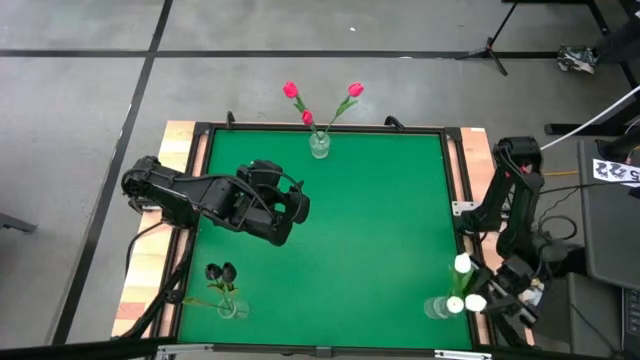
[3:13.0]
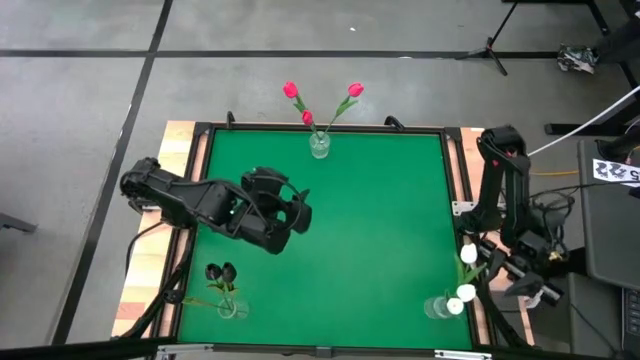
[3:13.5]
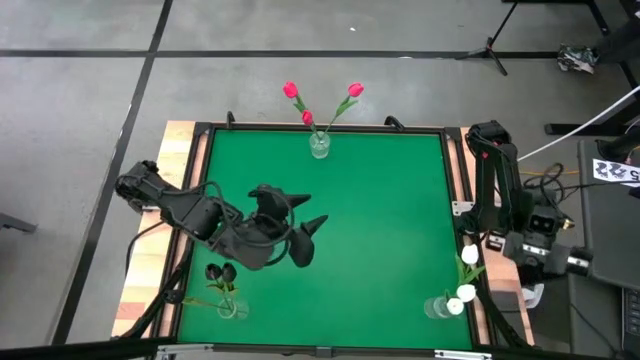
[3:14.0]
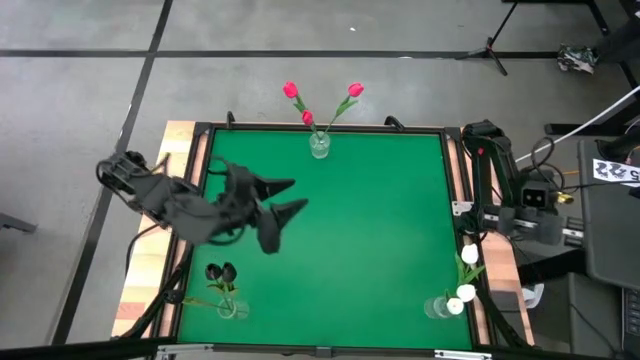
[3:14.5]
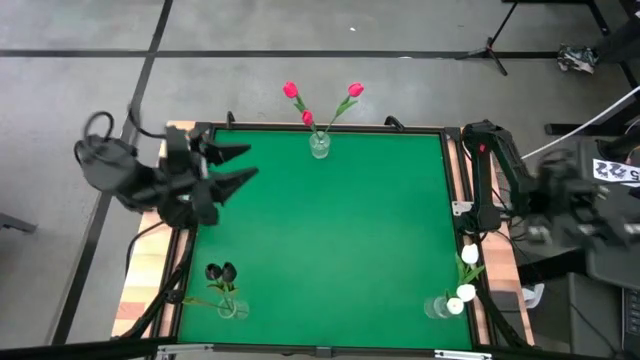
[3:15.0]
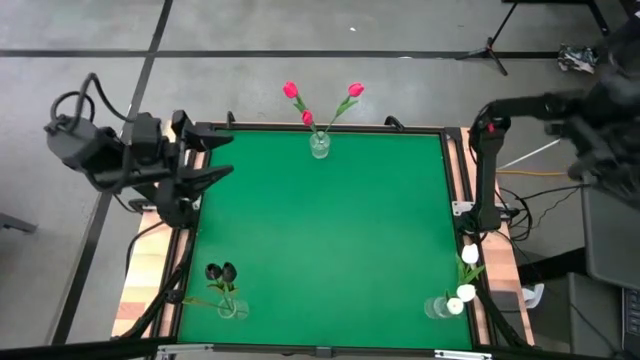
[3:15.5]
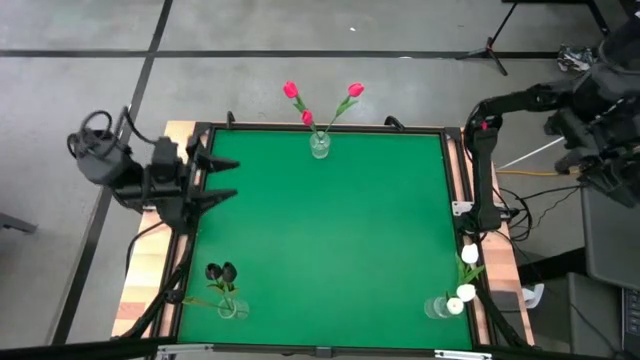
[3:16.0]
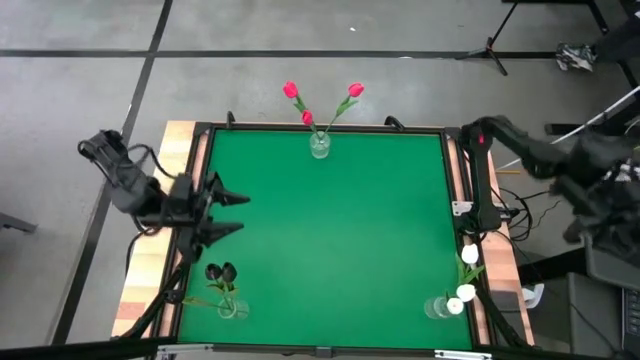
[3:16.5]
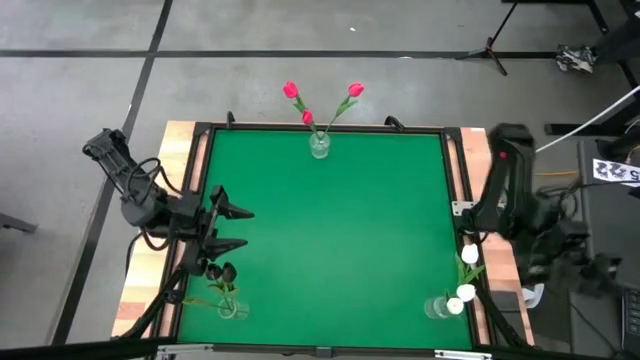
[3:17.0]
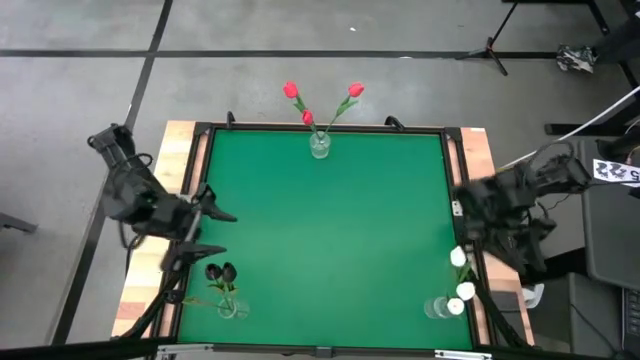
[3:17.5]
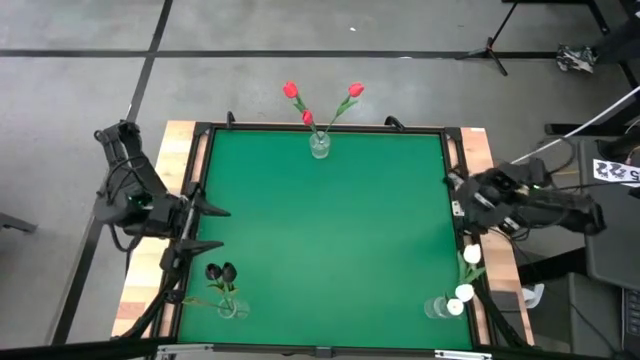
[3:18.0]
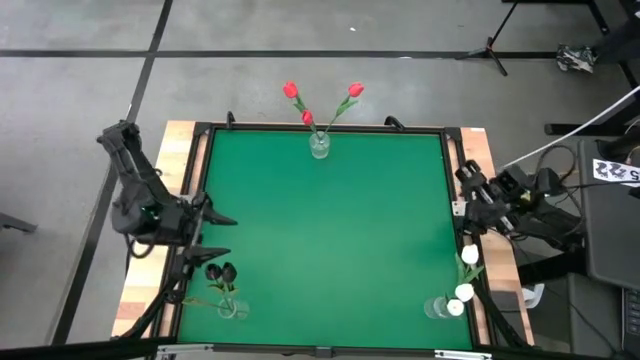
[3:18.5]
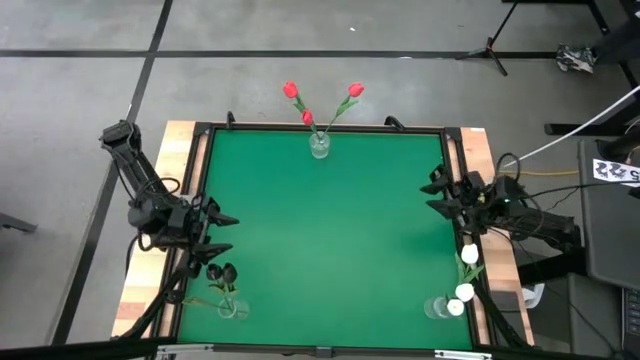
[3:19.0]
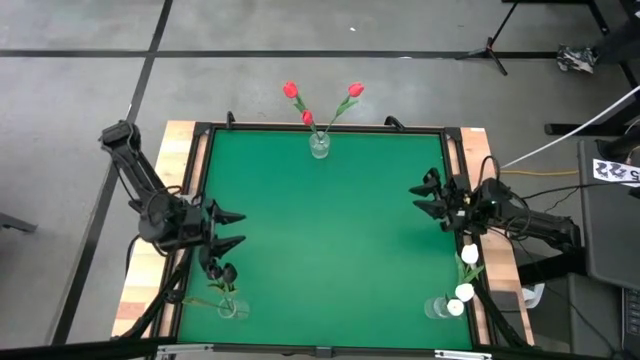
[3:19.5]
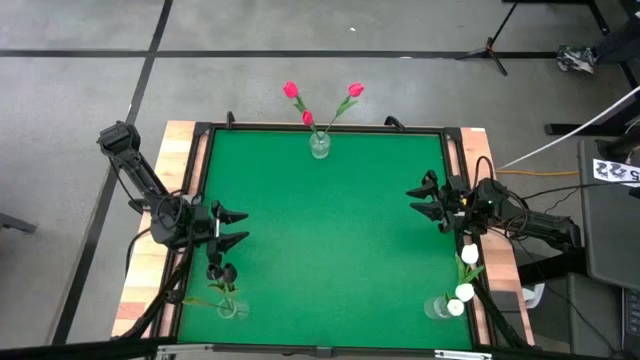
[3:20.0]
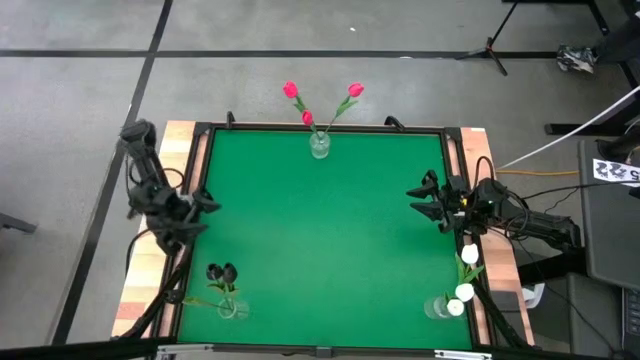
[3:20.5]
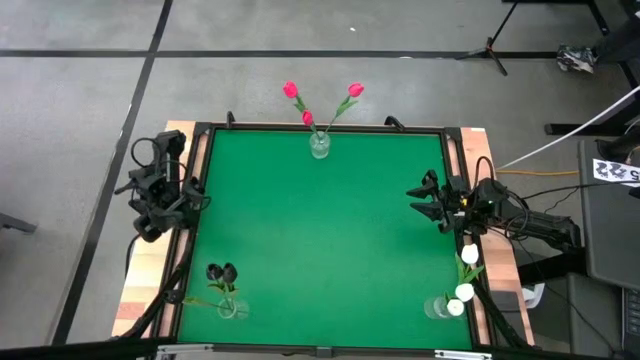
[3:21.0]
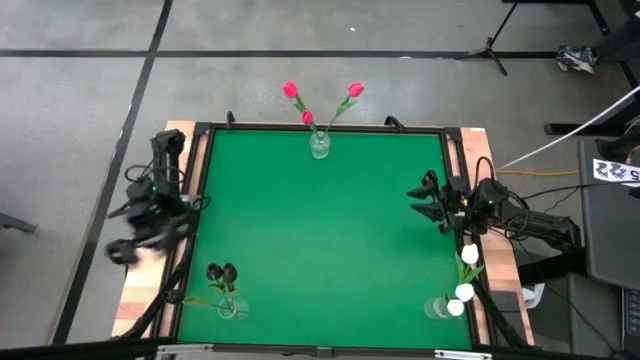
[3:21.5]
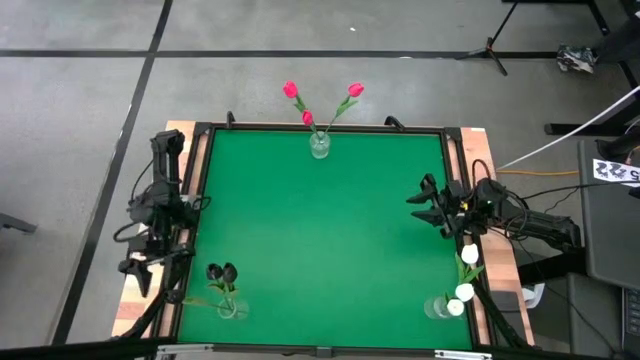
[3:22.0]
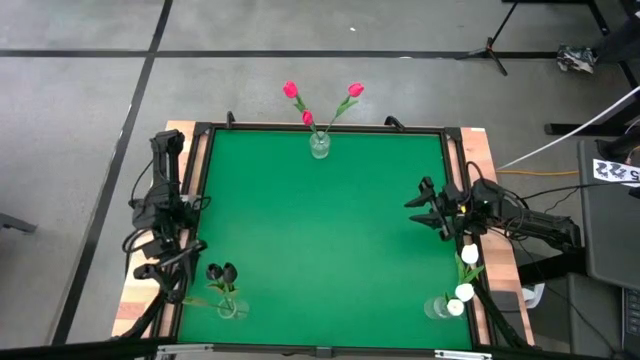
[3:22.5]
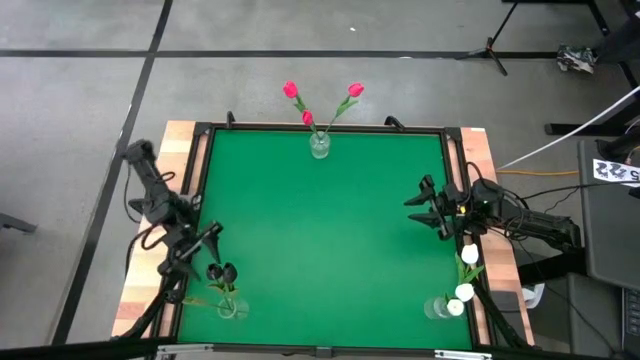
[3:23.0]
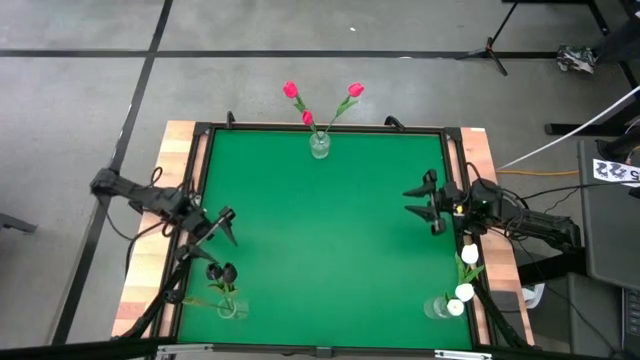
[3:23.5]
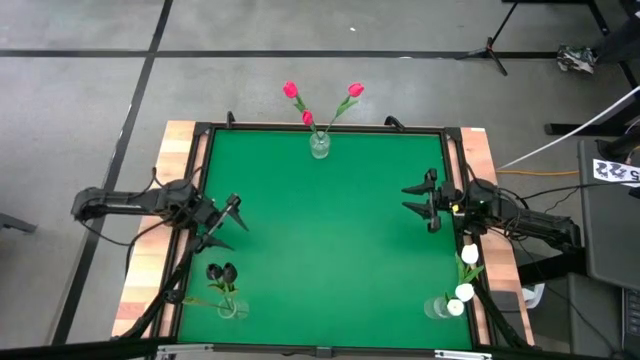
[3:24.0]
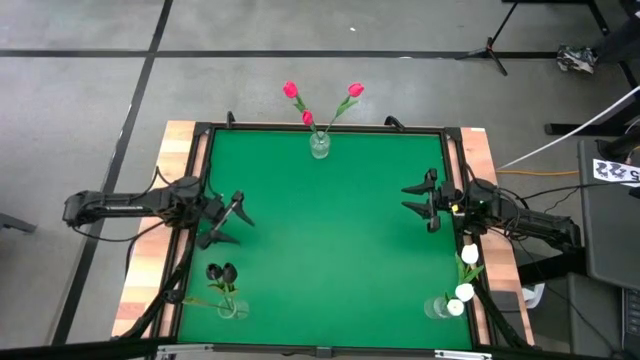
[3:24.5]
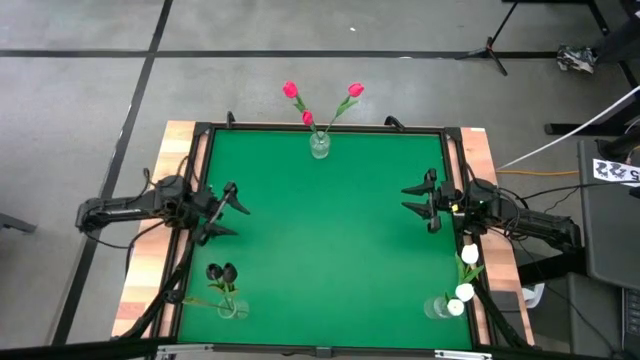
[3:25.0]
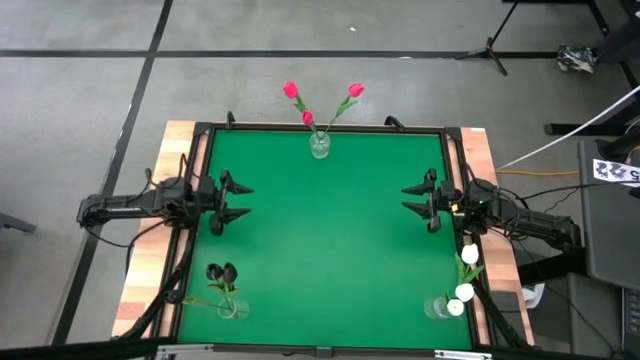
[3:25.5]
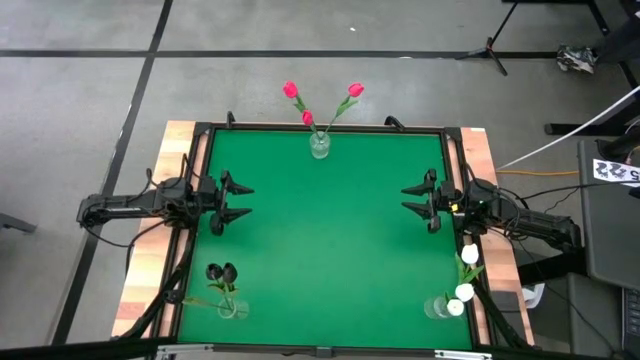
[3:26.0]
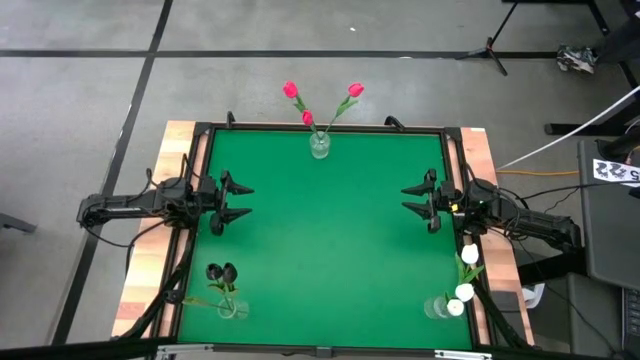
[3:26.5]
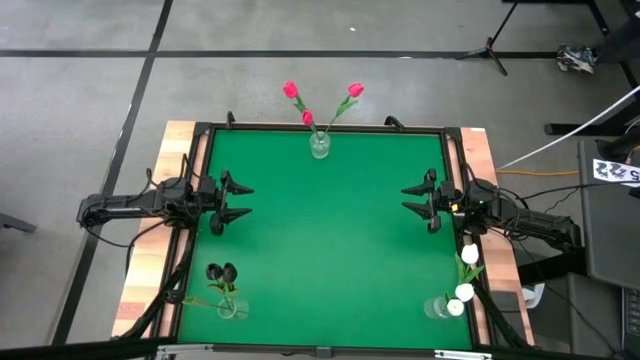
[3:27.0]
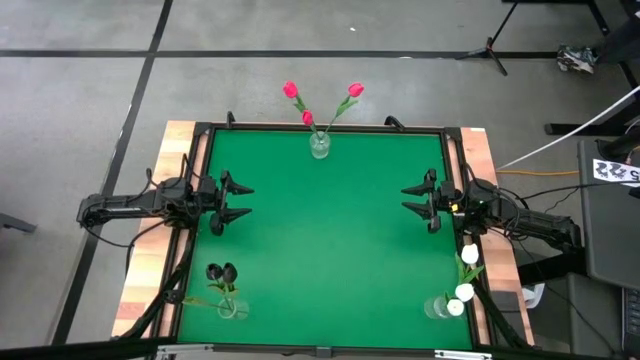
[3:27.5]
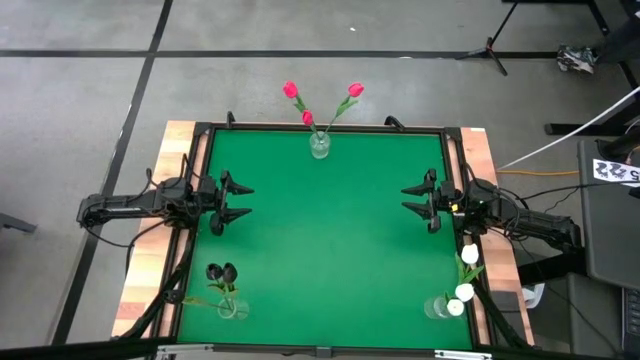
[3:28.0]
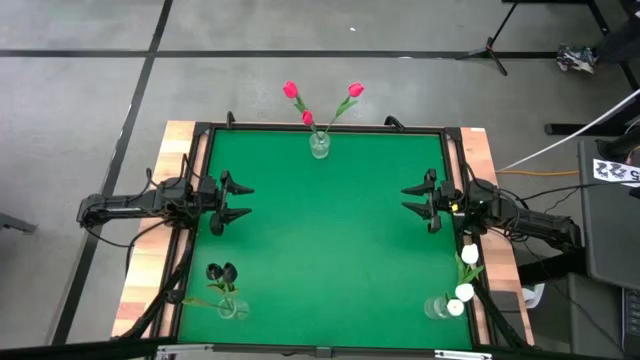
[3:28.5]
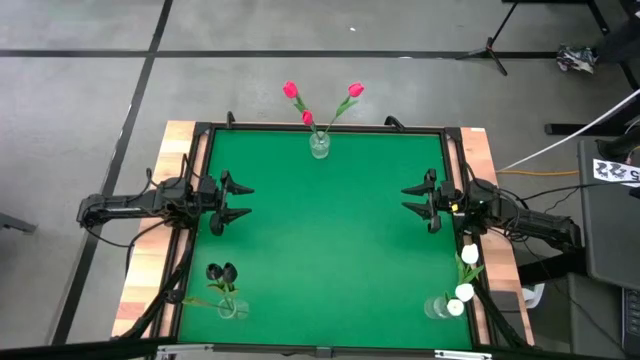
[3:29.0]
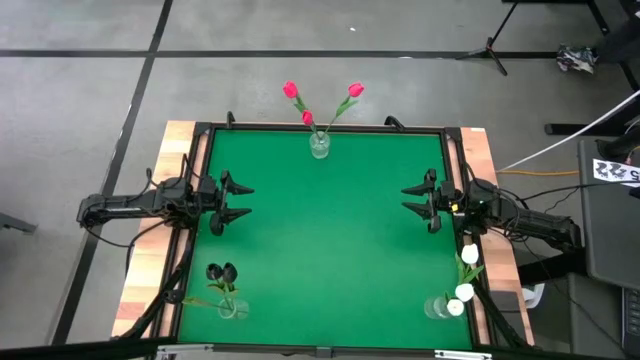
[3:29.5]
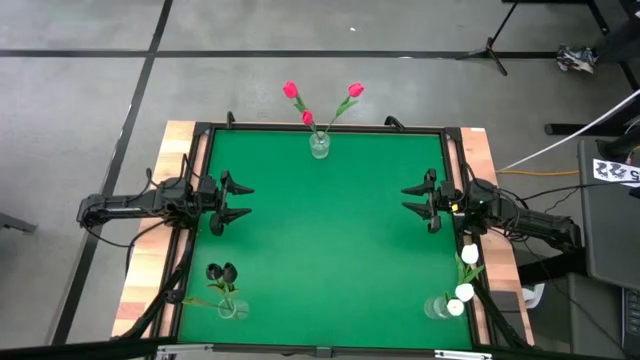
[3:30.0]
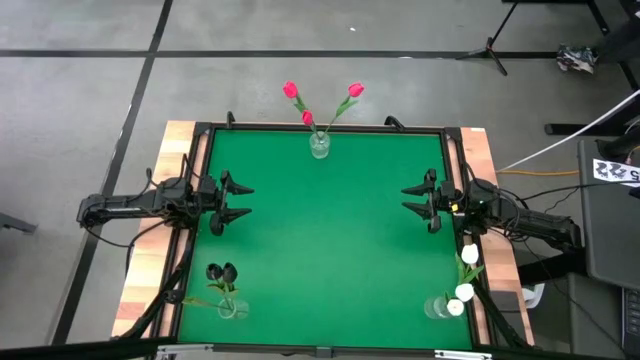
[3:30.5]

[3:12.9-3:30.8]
Task: Sort flowers into vase by color
Return to Home Position

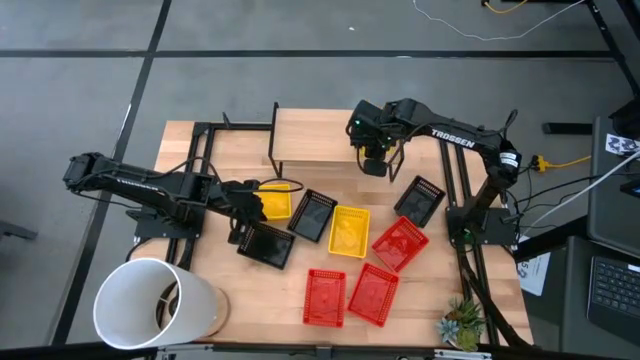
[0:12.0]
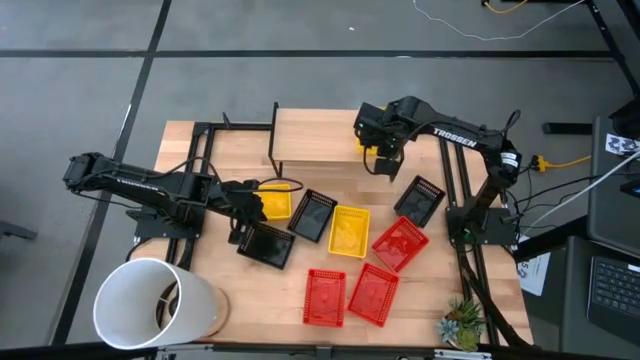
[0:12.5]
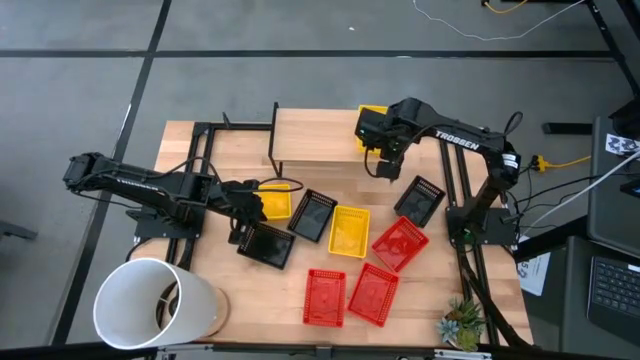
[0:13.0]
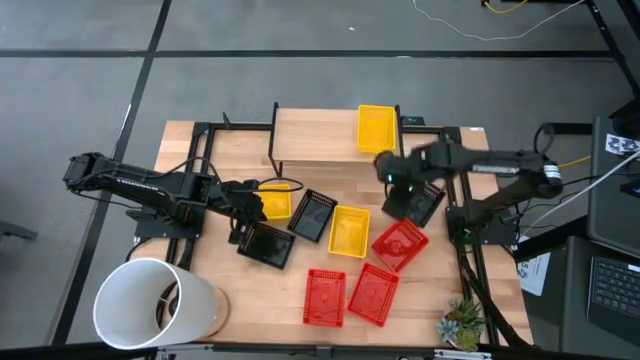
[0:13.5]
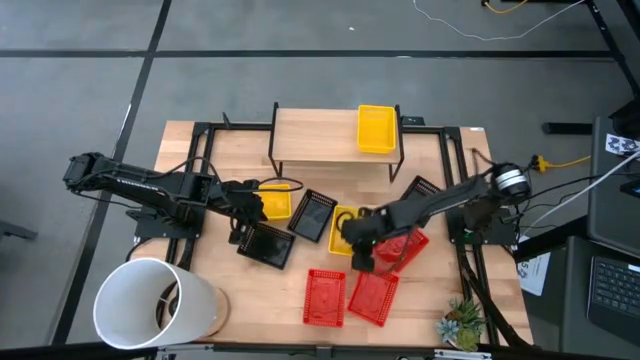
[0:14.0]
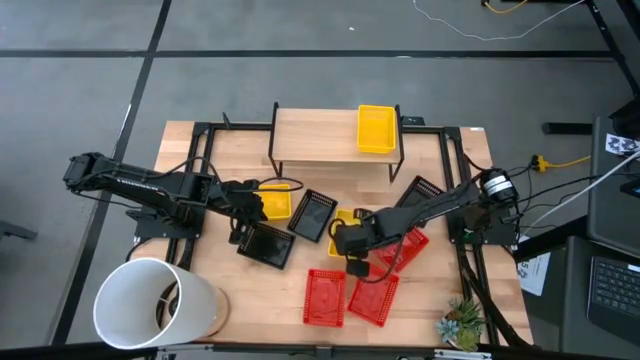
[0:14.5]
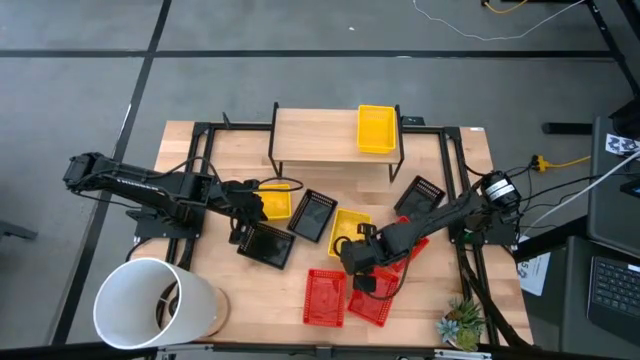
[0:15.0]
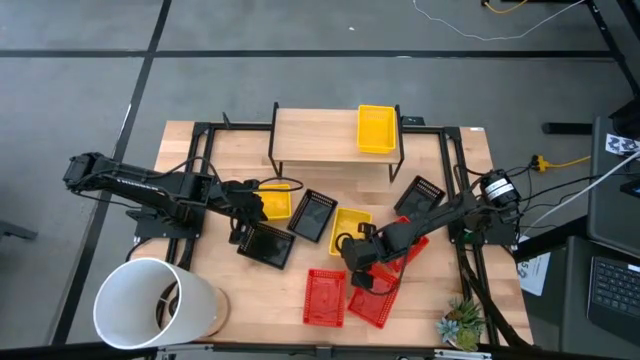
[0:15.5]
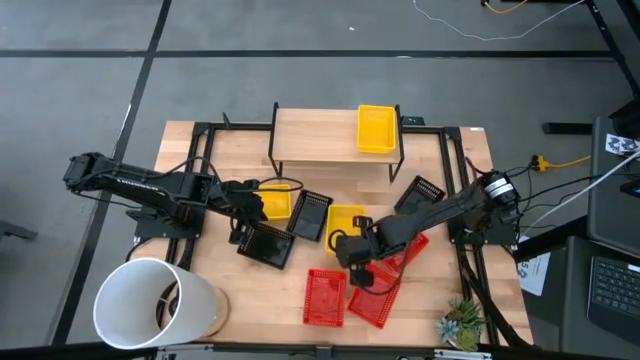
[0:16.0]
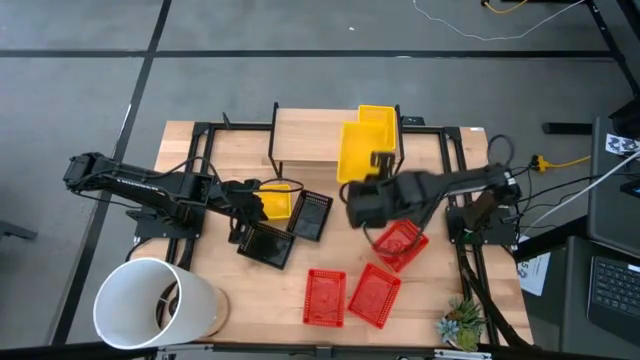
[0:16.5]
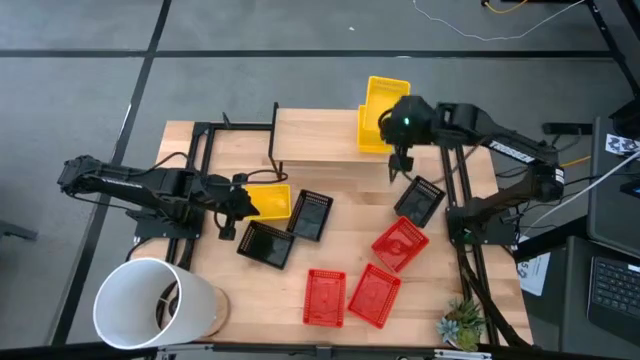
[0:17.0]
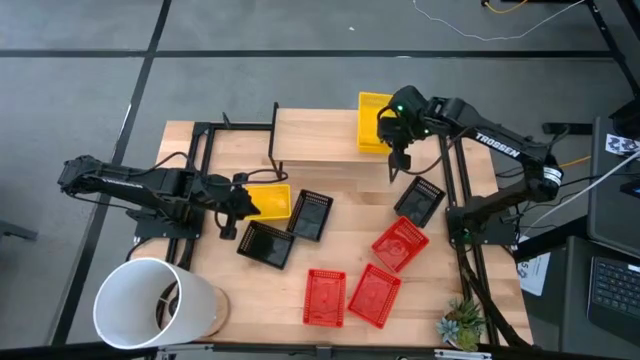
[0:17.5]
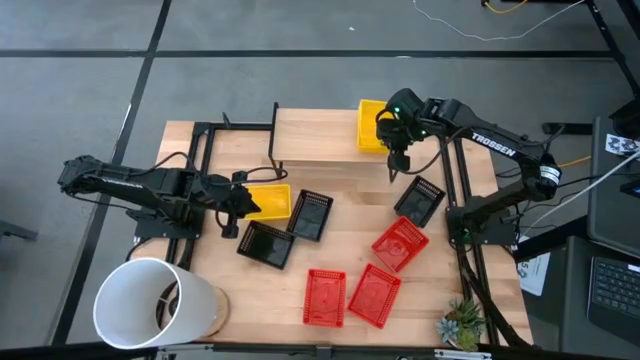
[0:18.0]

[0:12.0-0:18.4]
Task: Stack baskets on shelf by color
Stack the right yellow basket on top of the yellow basket on the shelf
